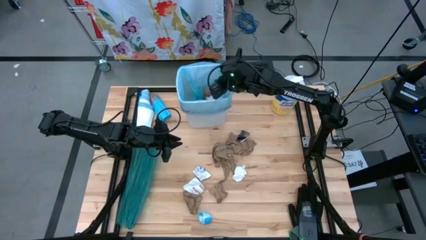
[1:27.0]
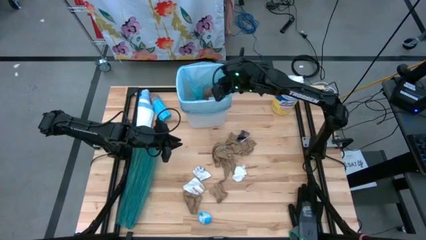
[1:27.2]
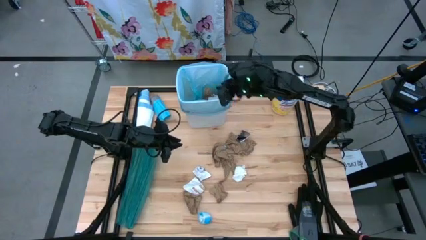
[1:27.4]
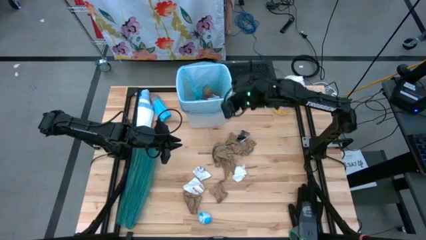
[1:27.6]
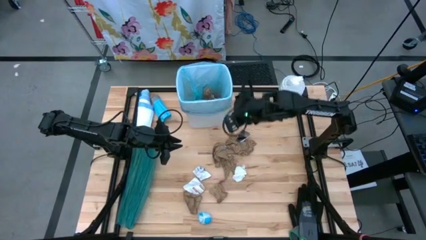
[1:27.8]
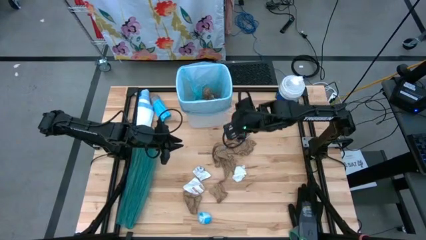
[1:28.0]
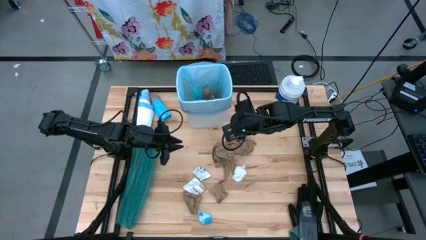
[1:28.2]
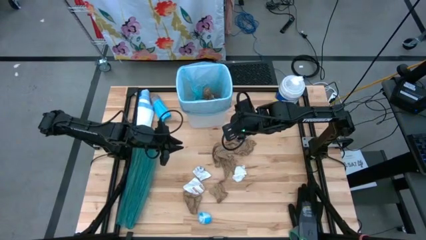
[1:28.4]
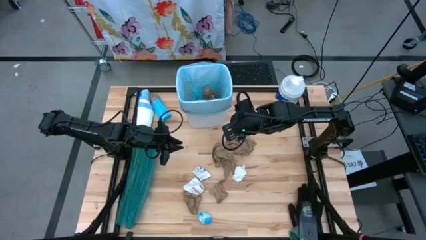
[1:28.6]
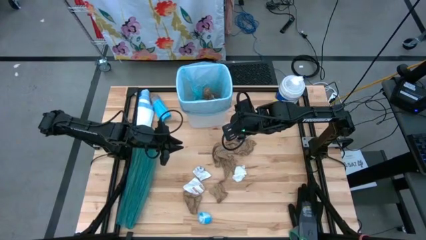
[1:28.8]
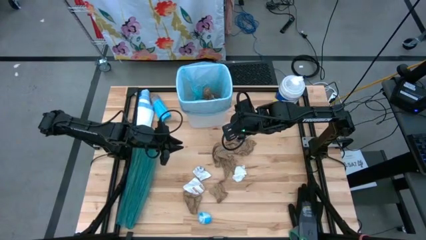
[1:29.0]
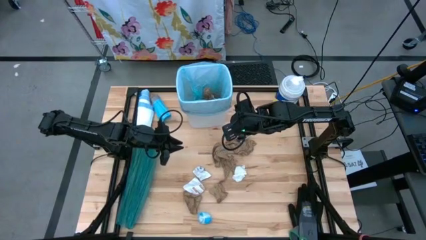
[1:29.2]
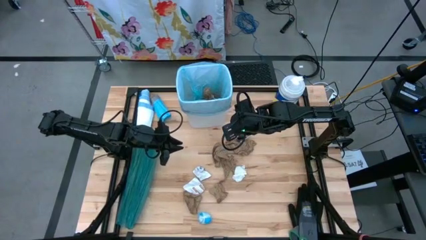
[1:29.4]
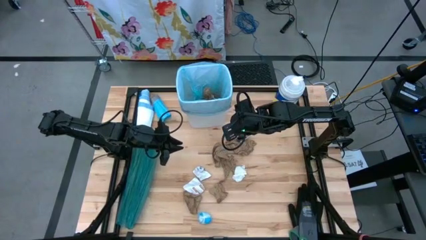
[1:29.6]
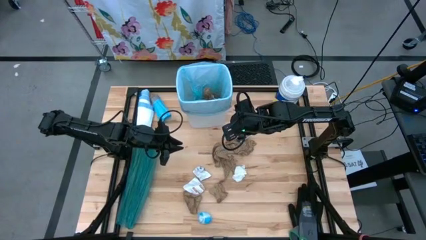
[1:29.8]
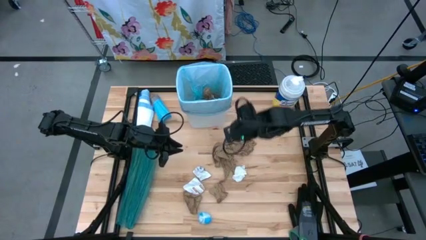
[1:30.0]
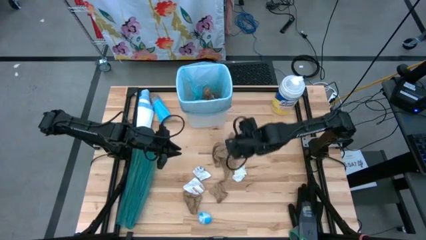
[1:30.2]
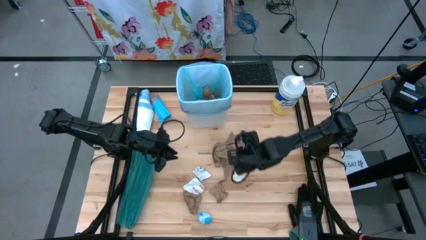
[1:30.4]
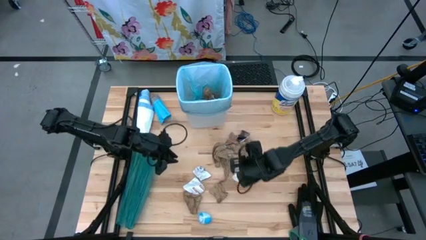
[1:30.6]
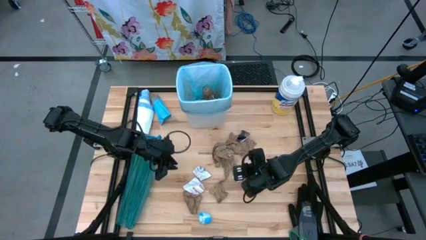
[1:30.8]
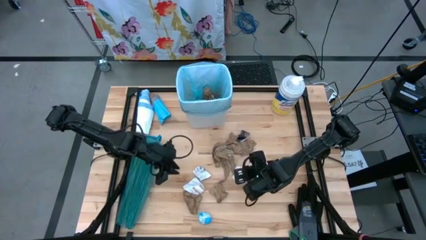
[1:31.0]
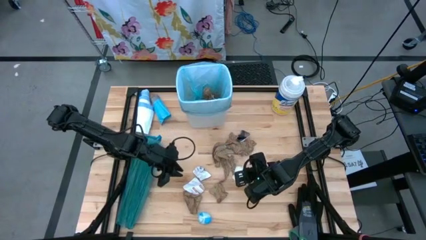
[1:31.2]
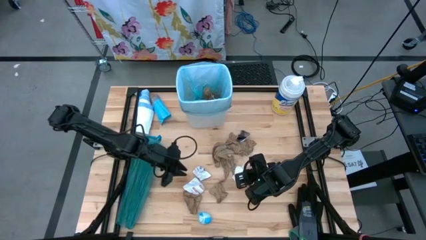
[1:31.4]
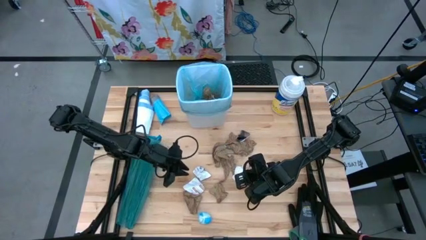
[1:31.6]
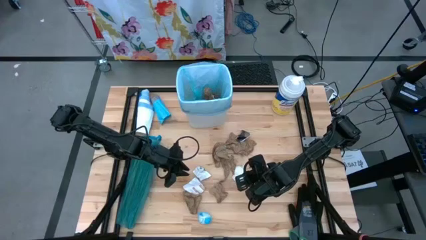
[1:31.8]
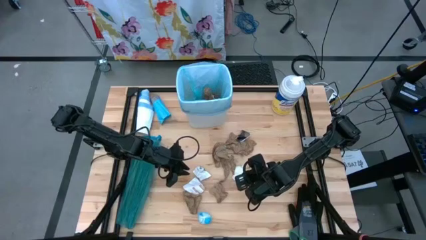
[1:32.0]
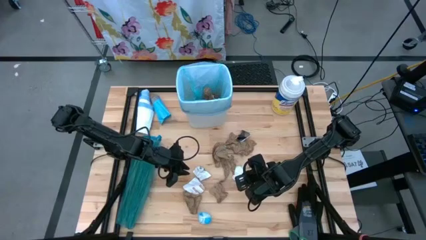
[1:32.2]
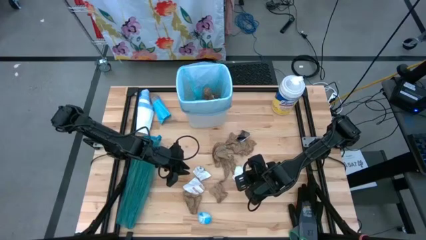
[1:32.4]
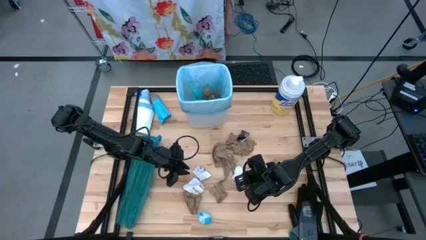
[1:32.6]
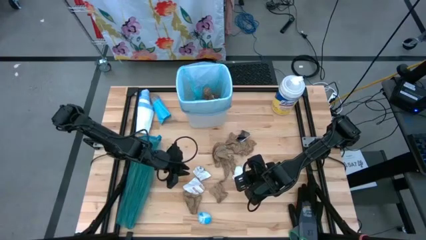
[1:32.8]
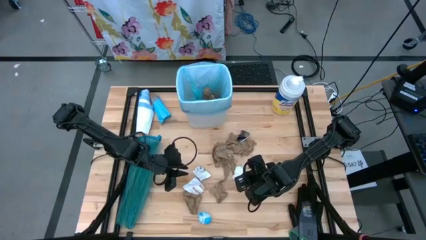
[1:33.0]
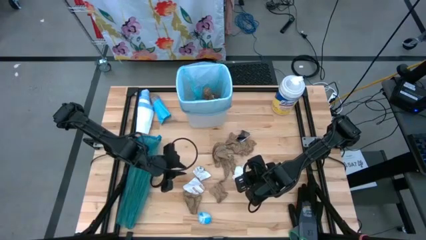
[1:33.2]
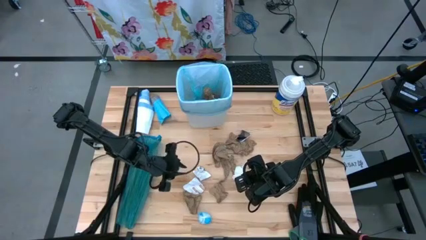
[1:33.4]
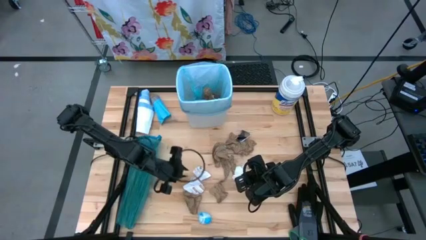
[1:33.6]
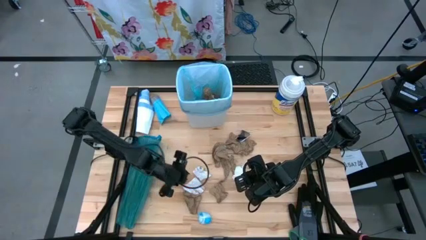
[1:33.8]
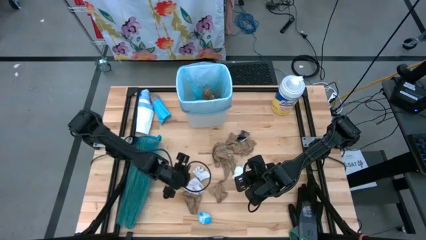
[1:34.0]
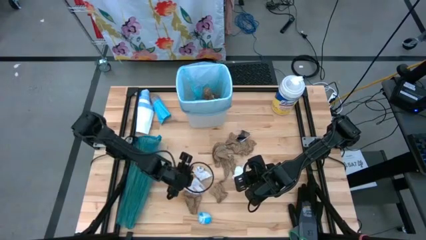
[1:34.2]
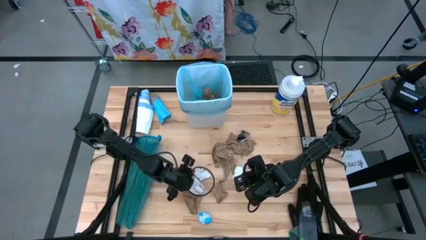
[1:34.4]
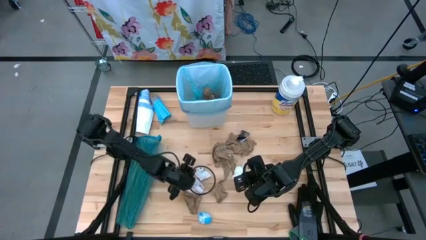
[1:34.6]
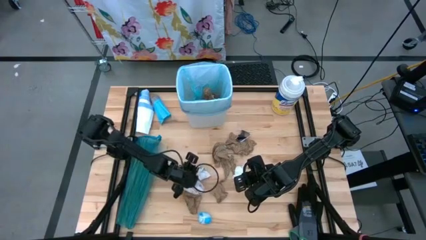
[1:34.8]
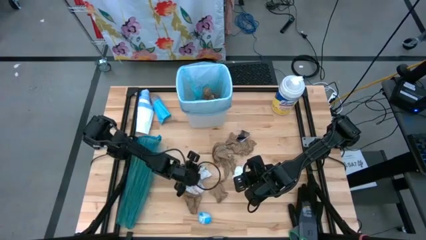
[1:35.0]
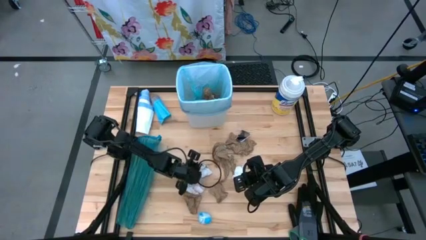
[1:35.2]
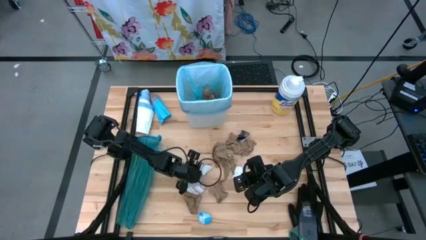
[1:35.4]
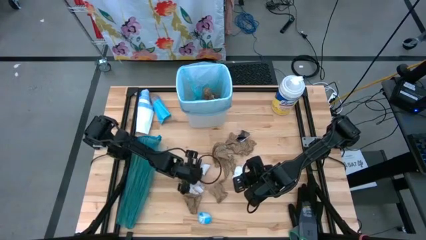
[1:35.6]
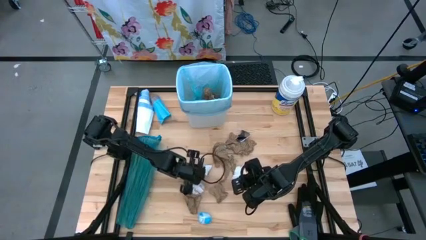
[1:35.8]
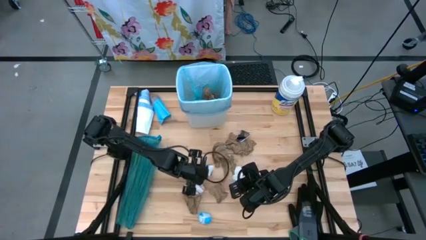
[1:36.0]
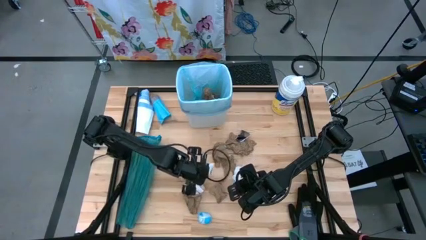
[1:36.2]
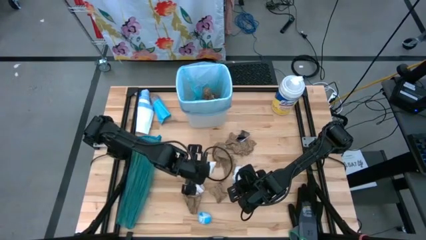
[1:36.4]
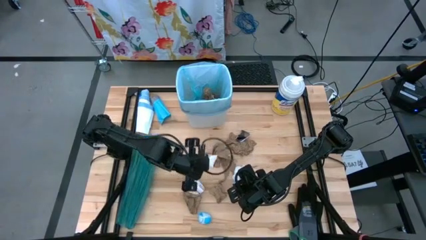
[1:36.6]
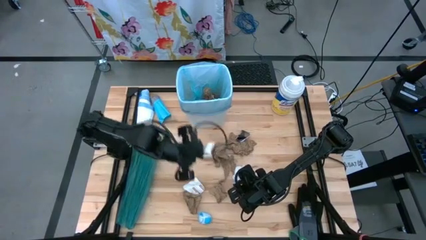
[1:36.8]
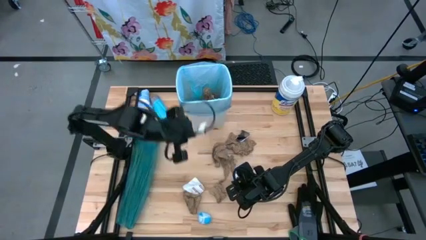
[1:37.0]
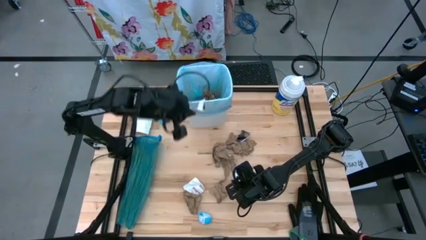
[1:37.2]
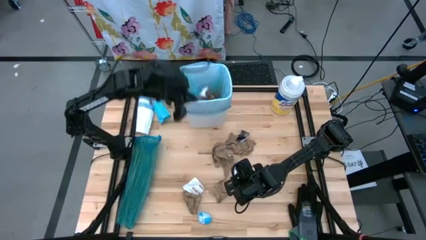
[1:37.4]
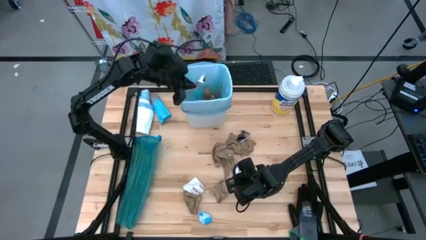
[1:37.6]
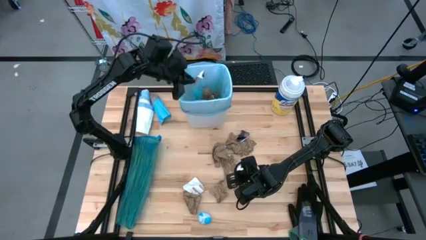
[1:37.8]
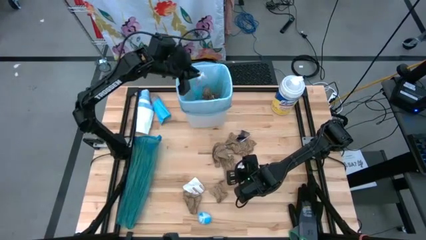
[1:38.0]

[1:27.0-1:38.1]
Task: place trash/remove bag and relplace
Put the white paper into the white trash bin

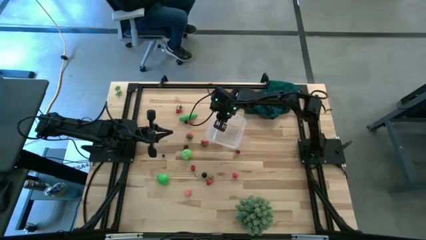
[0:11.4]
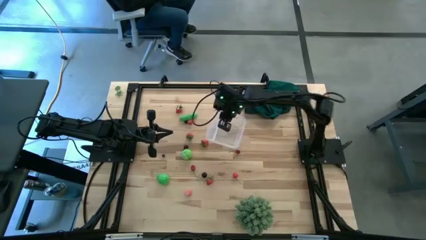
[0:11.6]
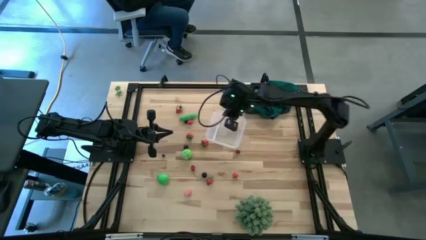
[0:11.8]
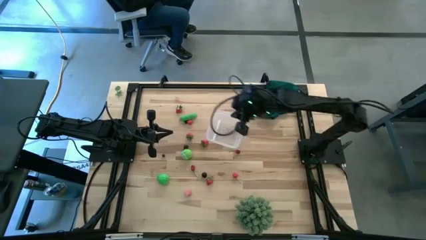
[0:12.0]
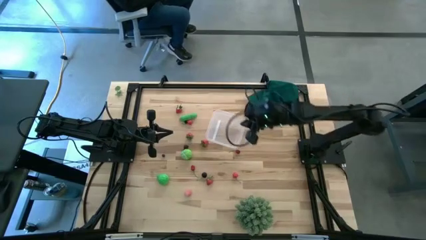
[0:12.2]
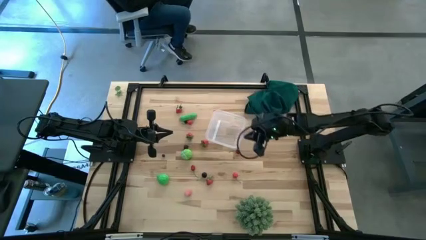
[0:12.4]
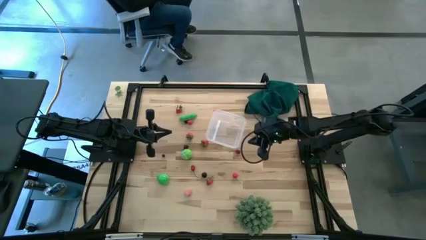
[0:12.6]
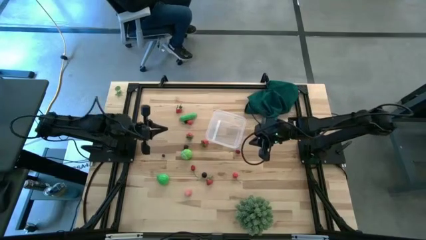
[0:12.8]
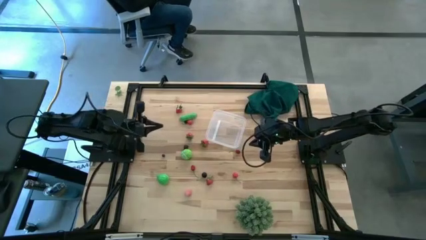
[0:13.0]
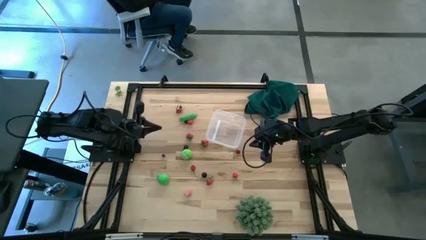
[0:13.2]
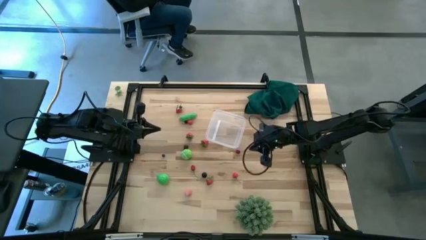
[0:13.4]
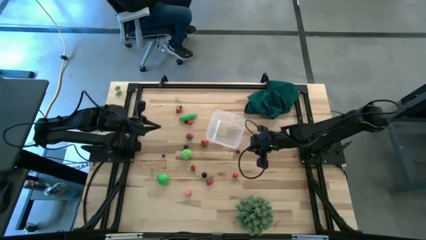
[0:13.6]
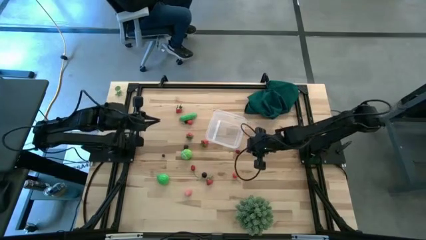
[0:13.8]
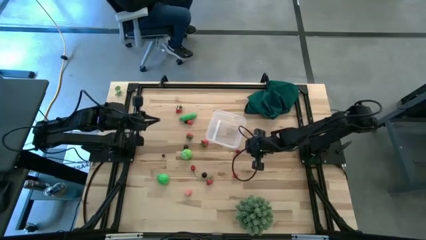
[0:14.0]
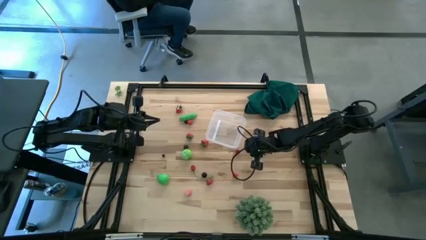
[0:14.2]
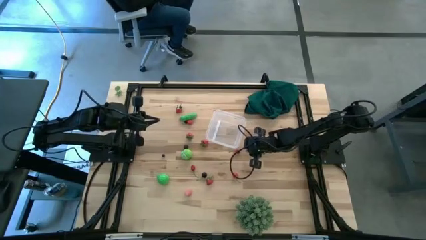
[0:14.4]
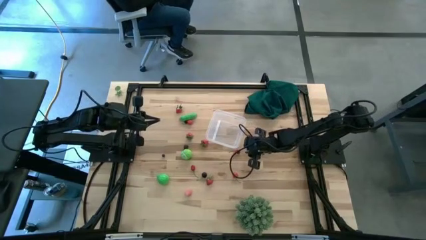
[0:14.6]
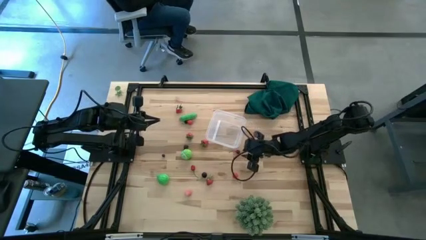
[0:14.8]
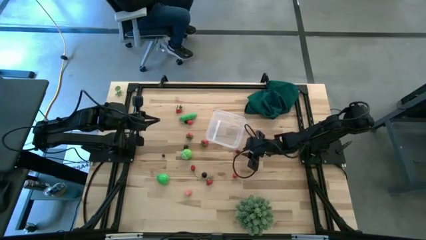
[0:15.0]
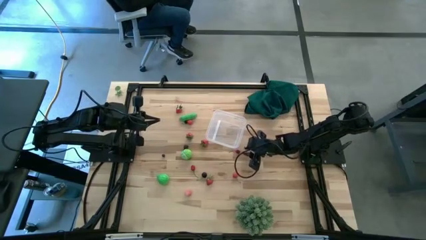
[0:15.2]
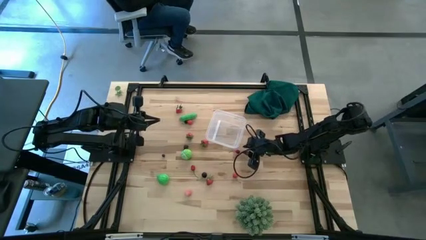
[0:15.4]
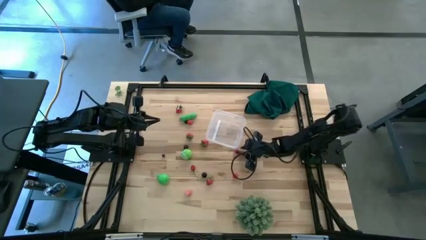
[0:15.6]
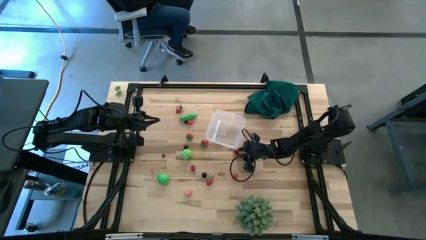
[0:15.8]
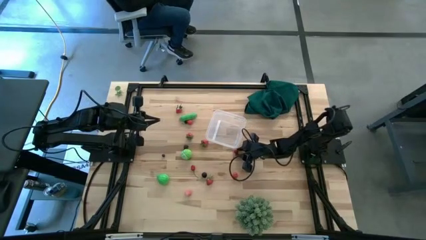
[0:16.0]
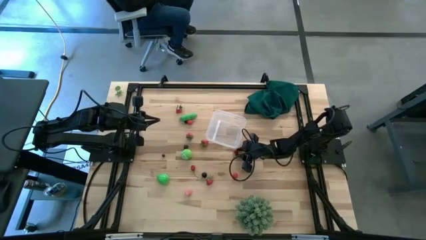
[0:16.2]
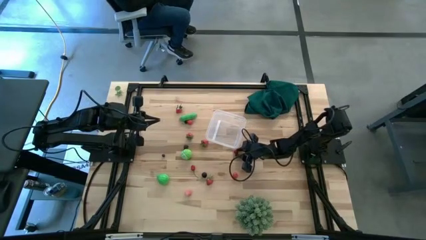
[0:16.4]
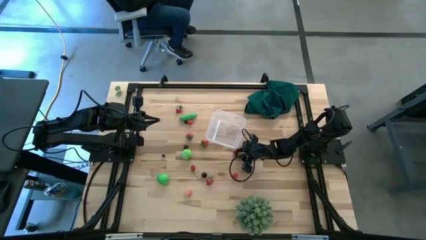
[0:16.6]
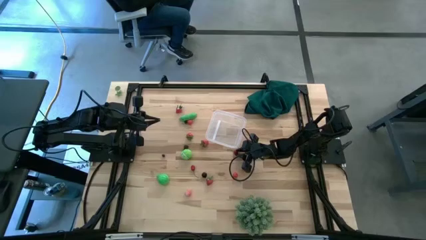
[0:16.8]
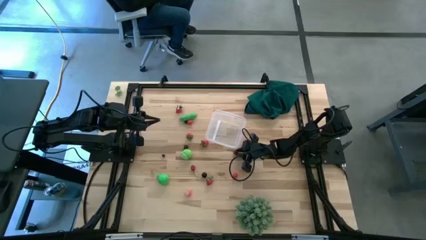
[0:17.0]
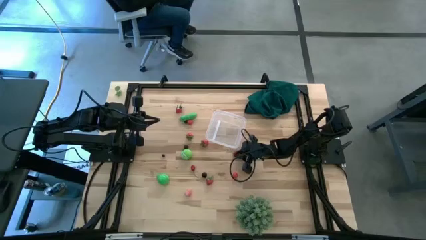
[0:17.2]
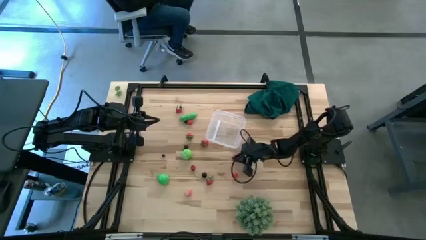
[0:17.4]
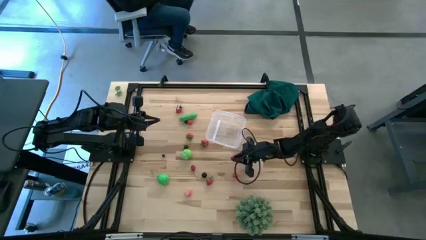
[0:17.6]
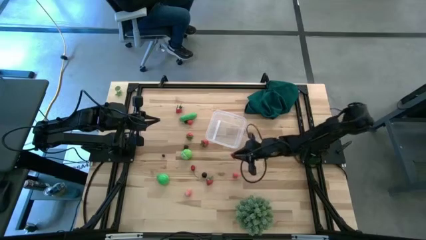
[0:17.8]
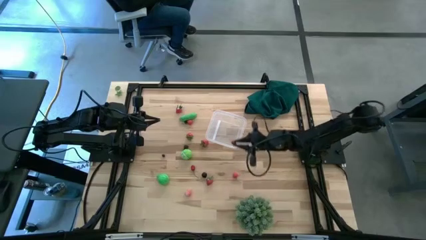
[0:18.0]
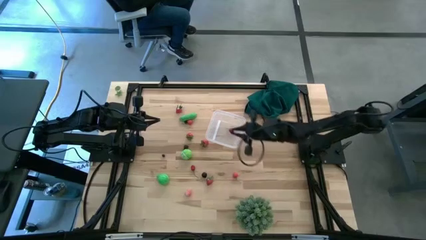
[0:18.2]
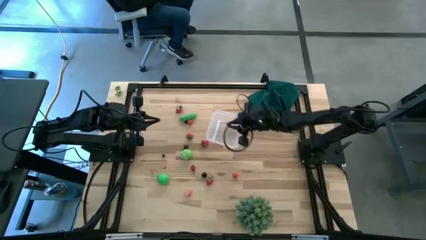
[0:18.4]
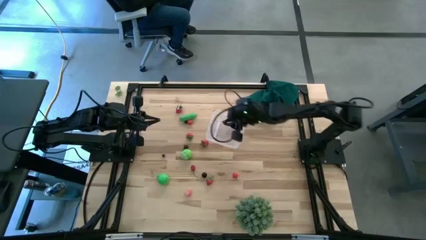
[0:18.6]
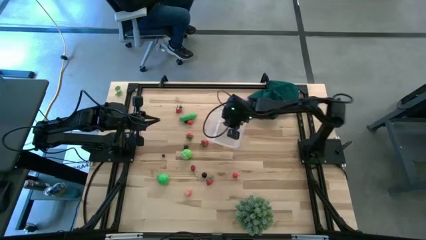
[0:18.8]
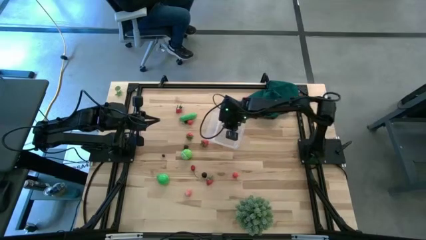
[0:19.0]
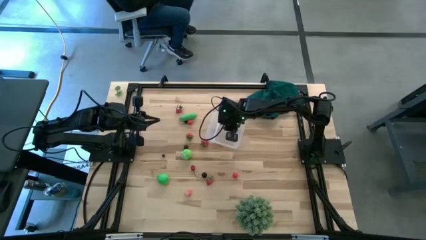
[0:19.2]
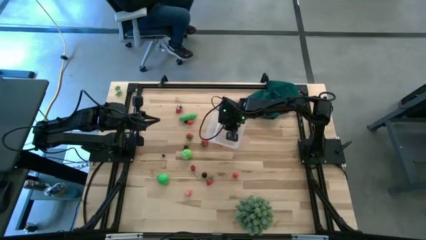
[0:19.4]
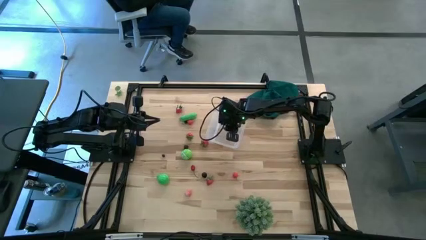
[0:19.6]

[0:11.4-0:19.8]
Task: Pick and placing Produce into tupperware
Put the red cherry into the transparent bin
